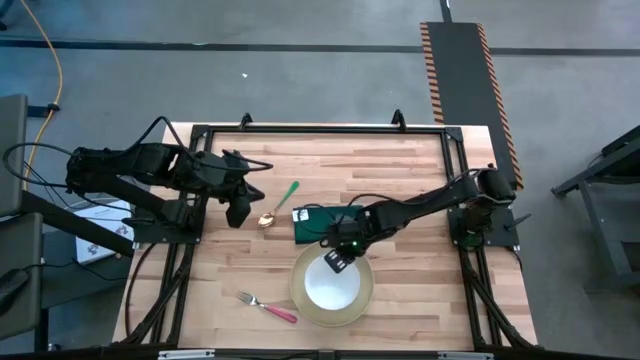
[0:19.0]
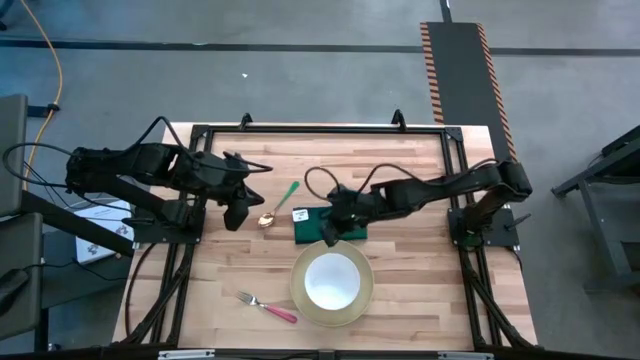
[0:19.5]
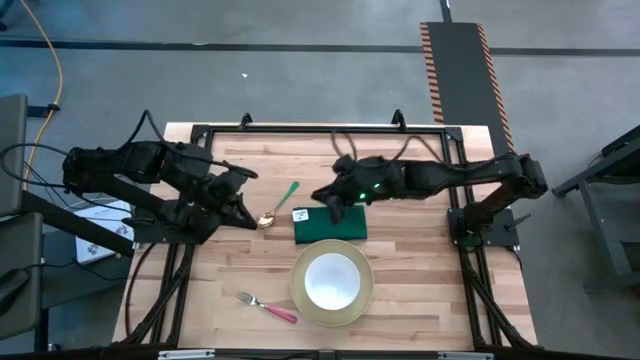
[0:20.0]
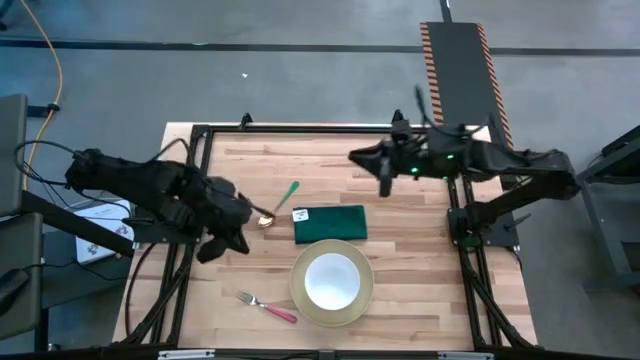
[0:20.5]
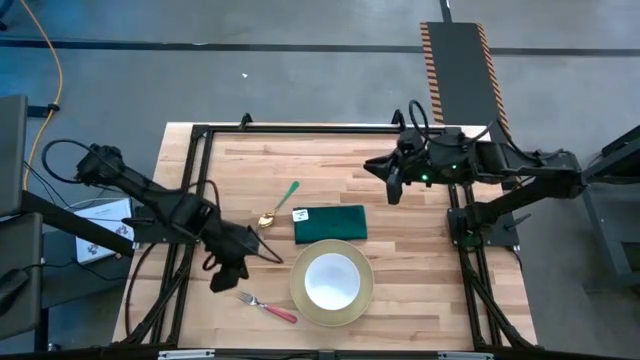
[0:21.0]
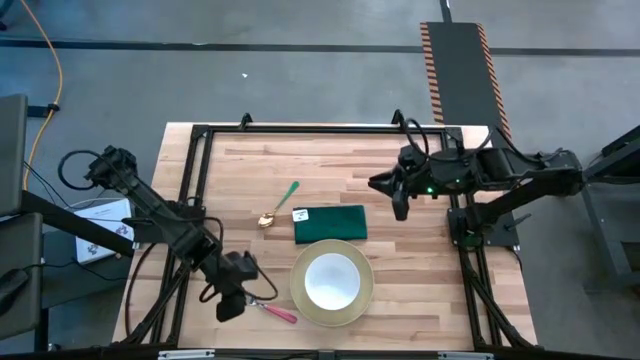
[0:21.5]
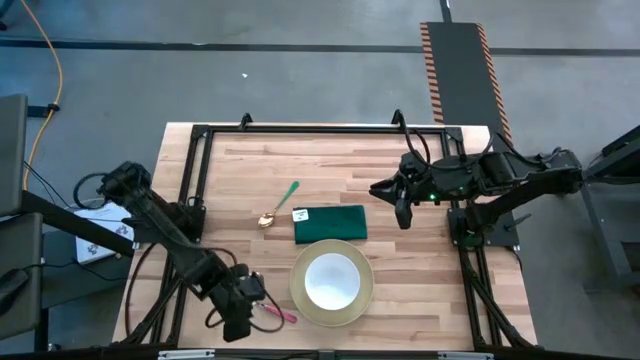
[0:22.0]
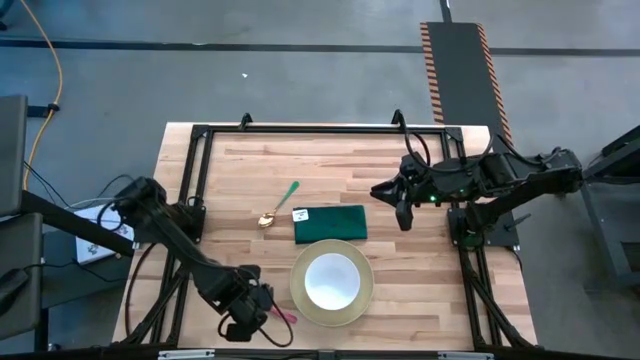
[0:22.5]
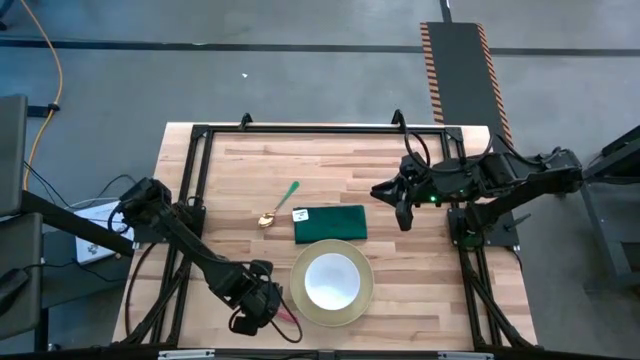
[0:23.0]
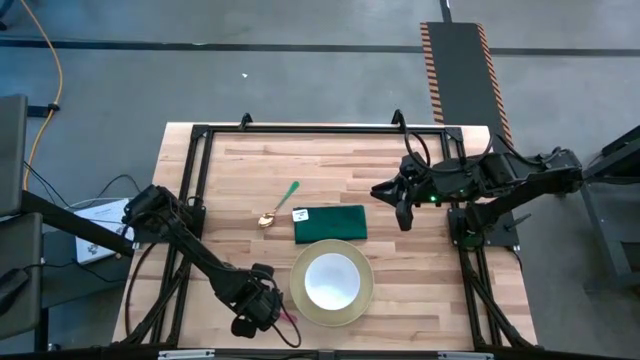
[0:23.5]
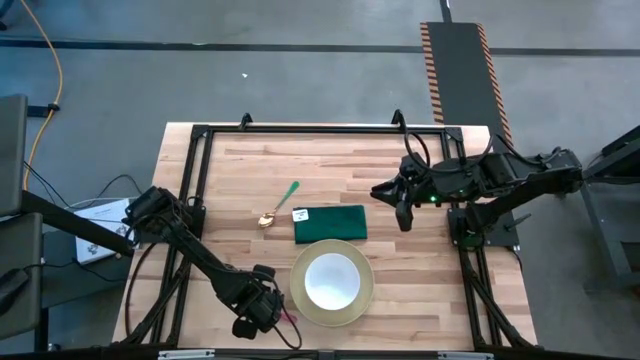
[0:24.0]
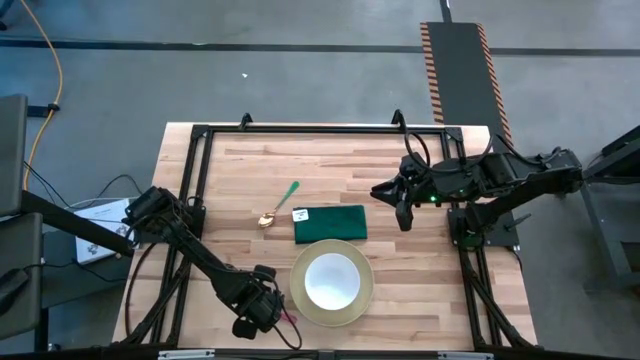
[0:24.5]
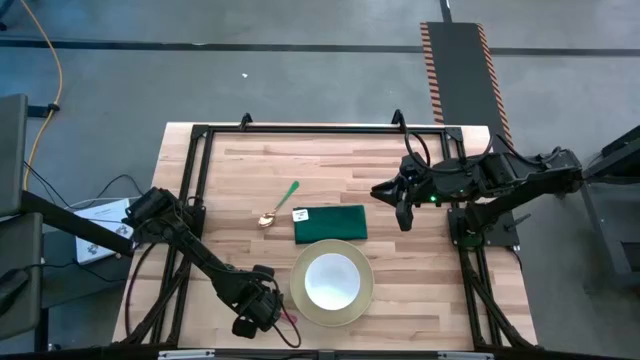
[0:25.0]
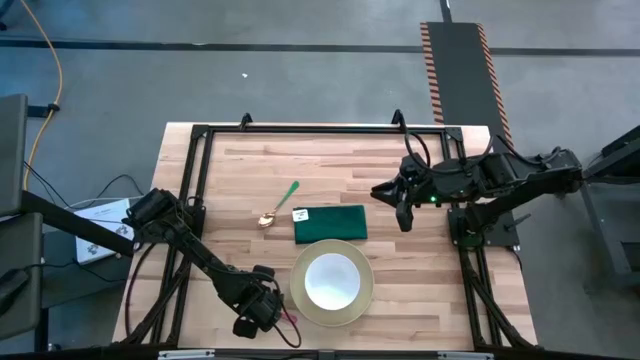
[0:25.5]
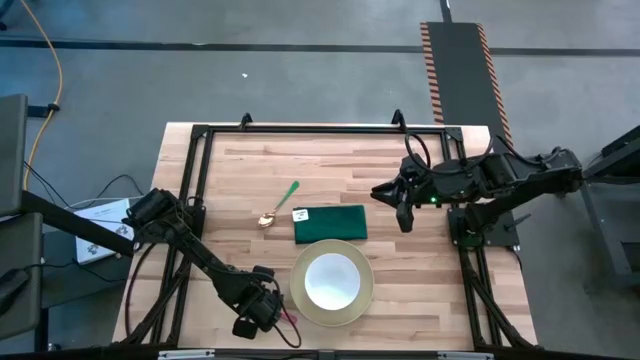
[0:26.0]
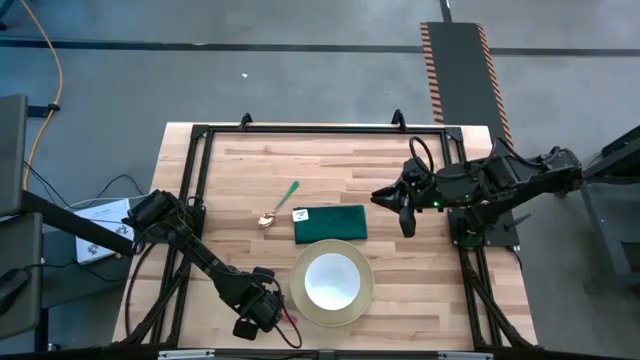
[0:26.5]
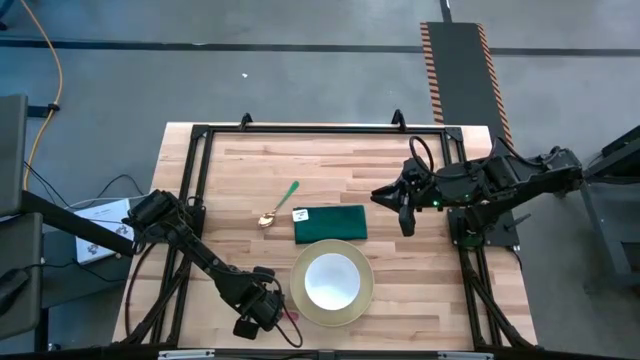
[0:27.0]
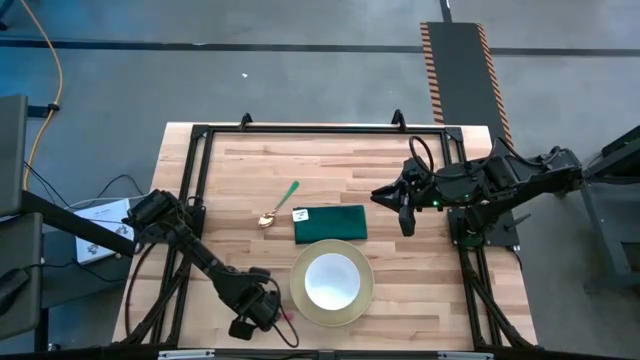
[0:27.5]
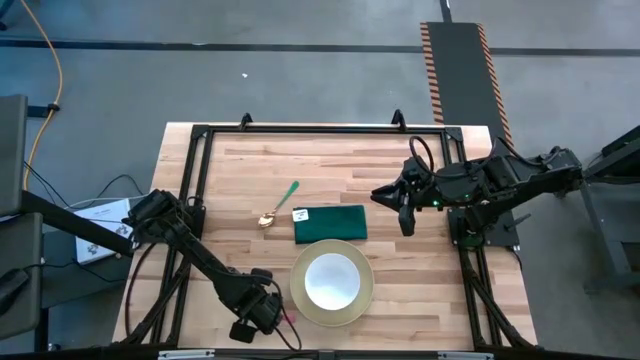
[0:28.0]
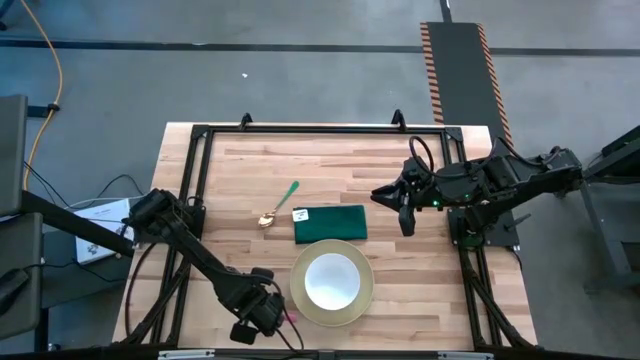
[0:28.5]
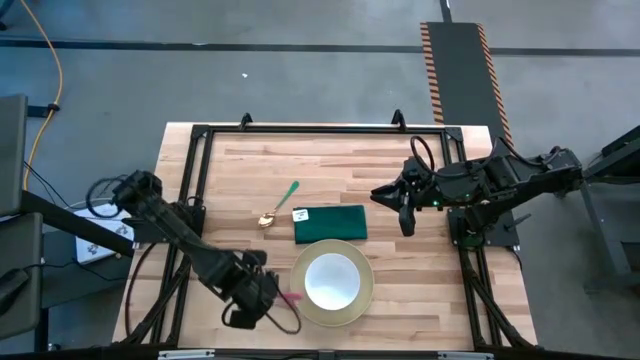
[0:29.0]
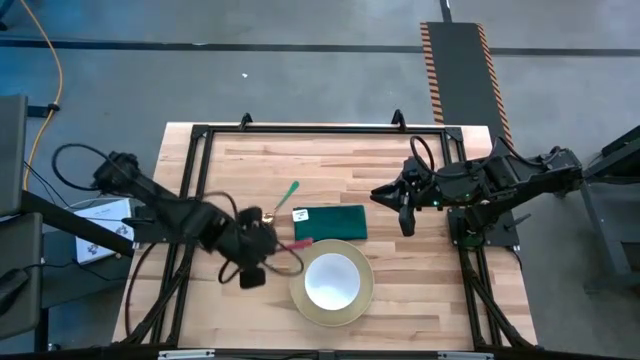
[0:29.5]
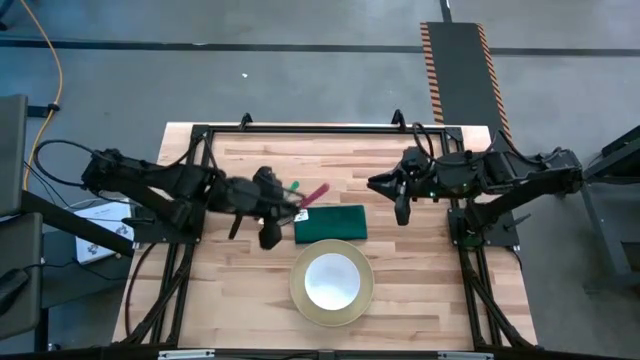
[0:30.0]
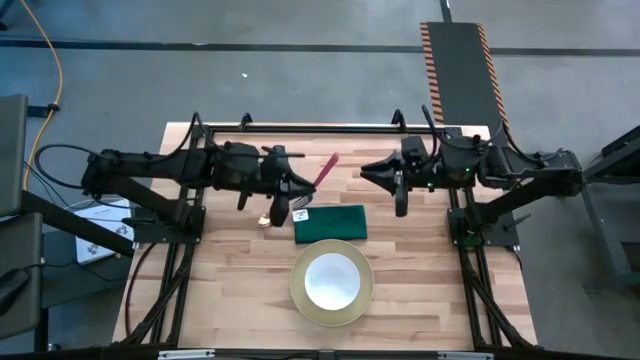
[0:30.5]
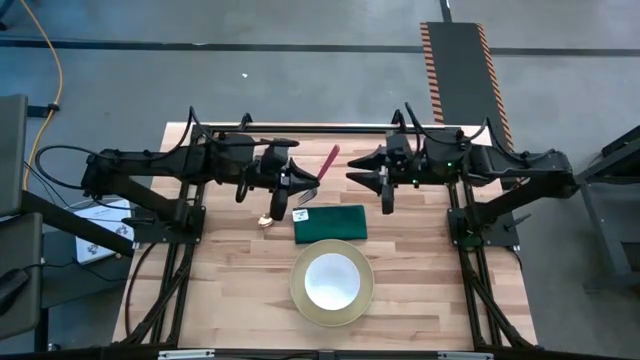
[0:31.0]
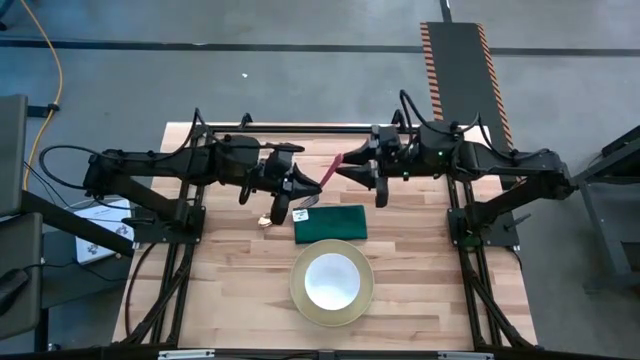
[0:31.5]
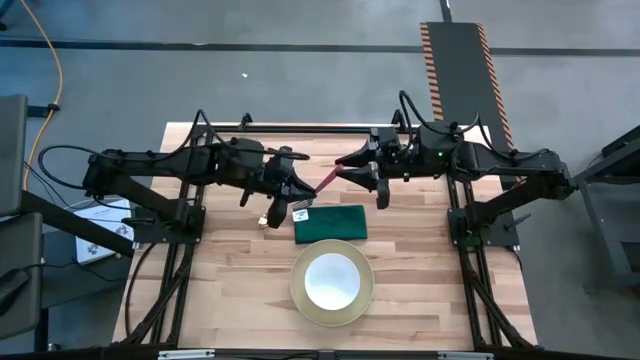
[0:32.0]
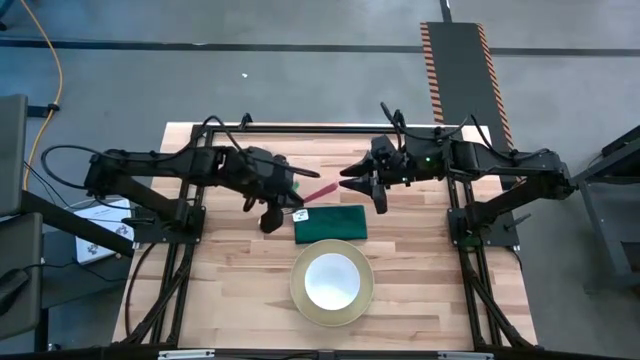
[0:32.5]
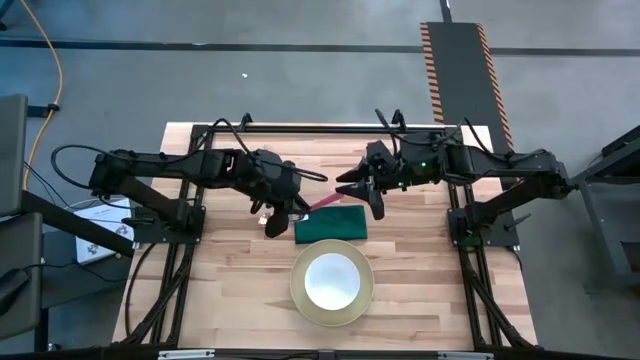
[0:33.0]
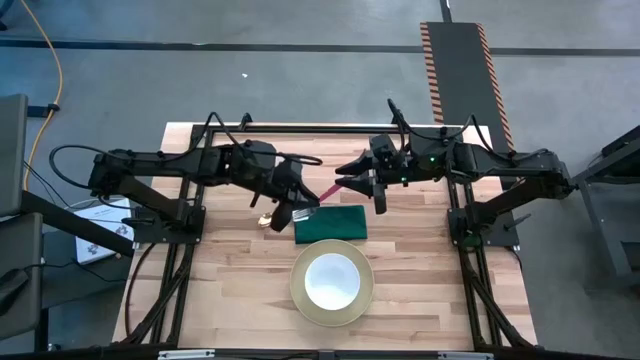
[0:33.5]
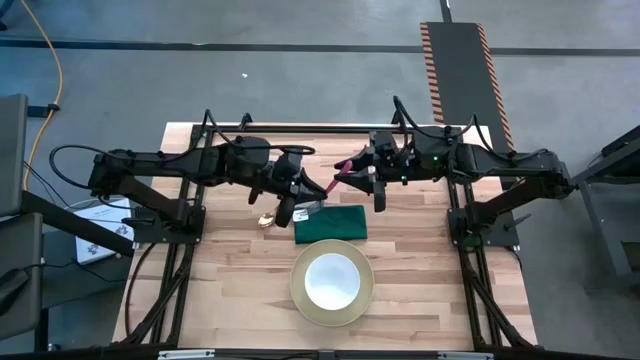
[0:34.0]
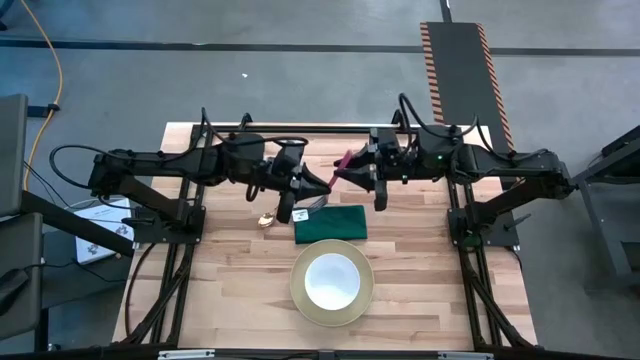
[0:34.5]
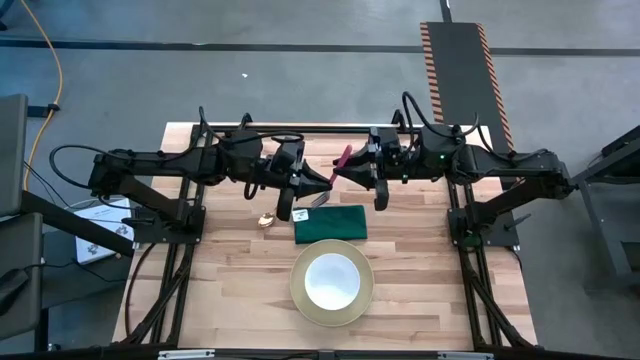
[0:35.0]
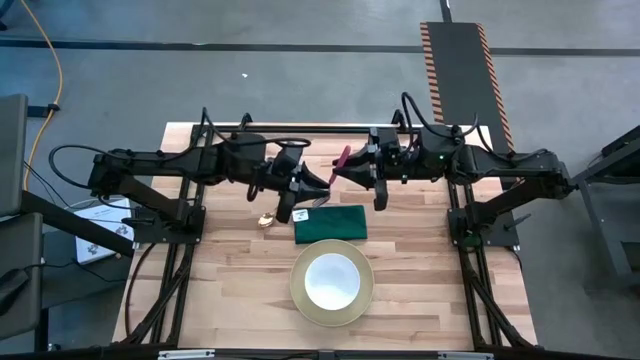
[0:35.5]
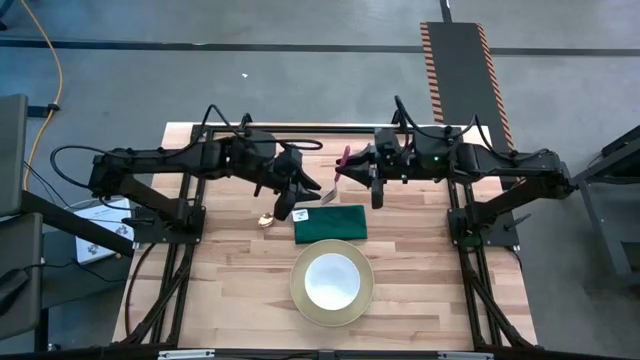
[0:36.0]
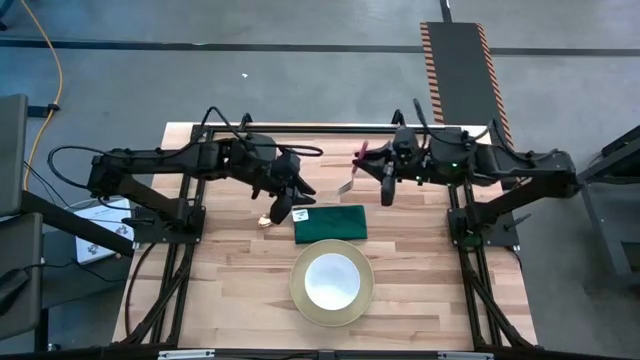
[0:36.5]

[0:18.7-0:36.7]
Task: Set table place
Put the red fork to the right of the yellow plate

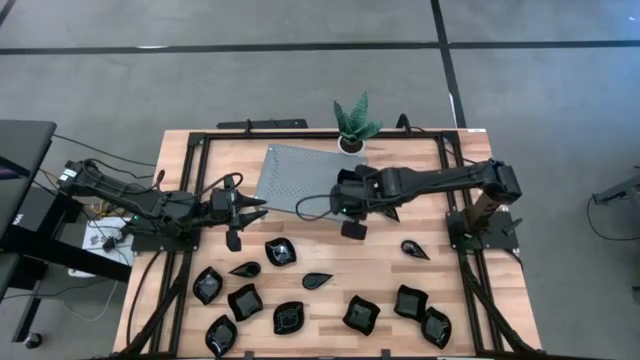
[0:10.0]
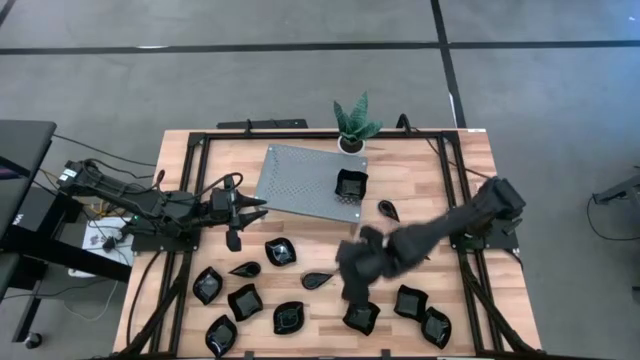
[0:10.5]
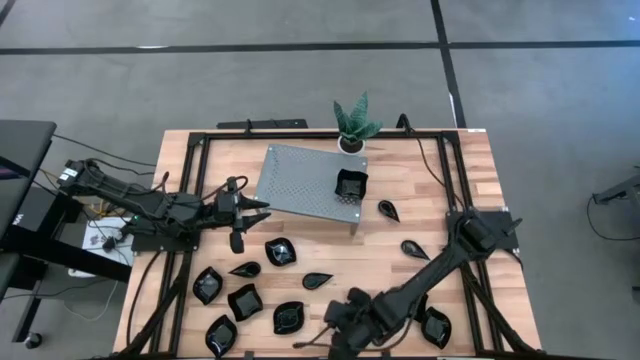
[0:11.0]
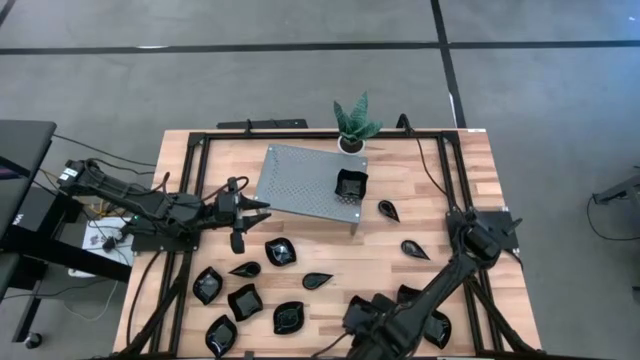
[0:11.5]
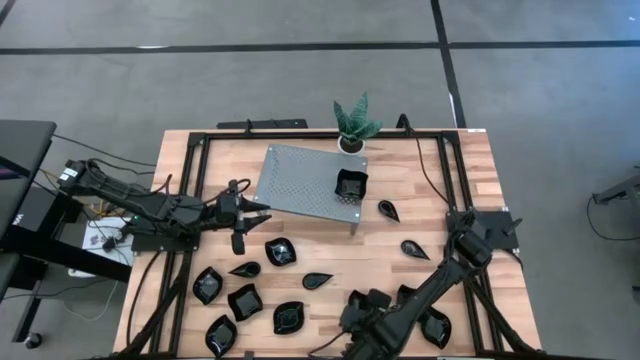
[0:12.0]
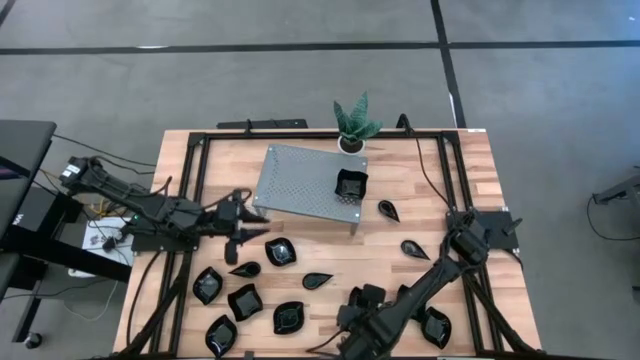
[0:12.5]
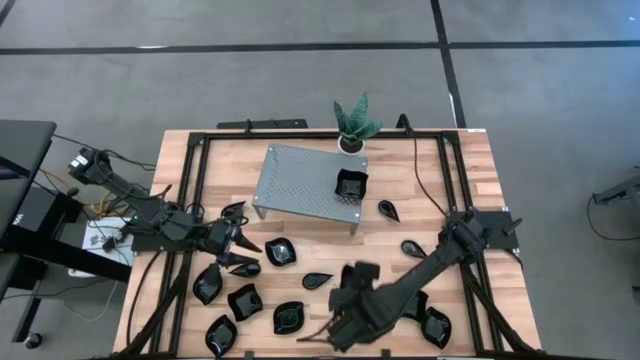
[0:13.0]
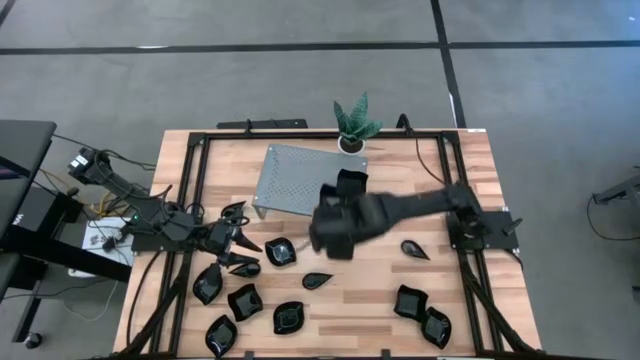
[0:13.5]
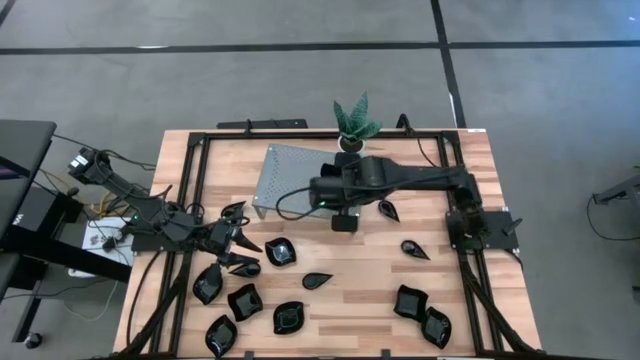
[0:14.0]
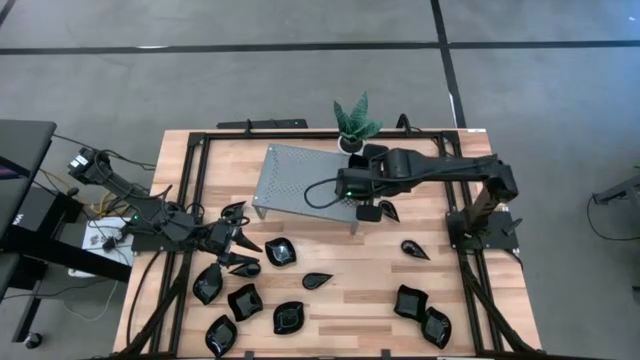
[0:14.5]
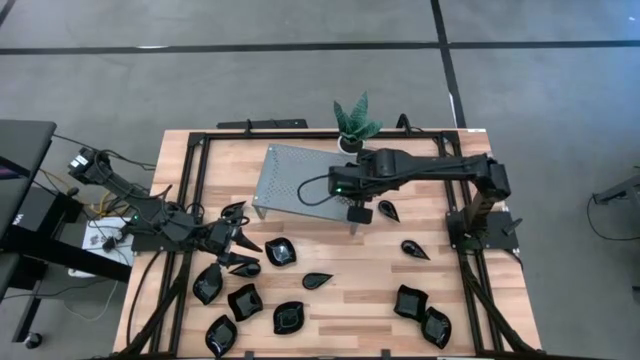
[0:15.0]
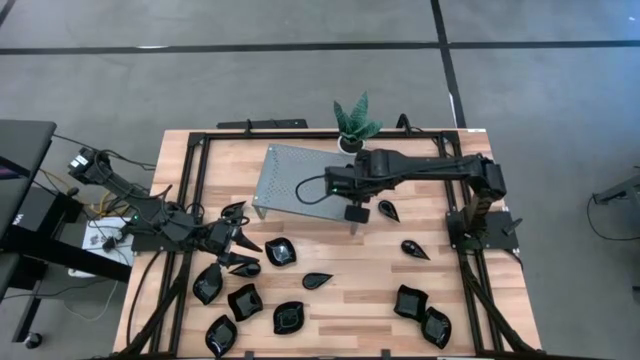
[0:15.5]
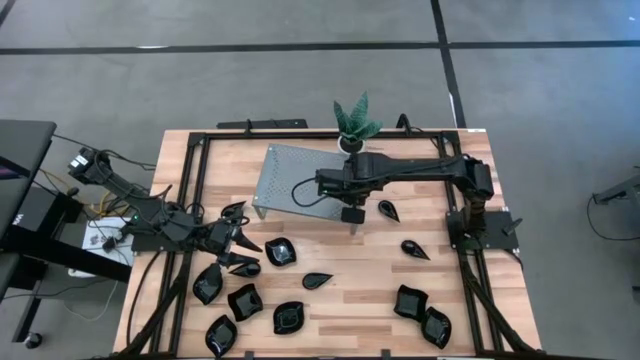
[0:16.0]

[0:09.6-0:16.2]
Task: Pick & Place Mini shaped plates
Stack the distorted square plate on top of the distorted square plate on the shelf
